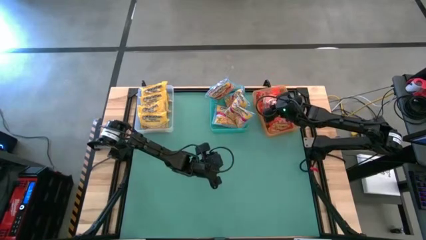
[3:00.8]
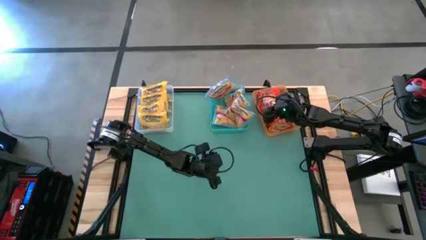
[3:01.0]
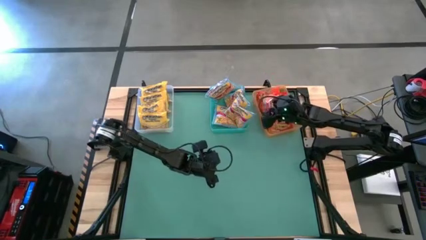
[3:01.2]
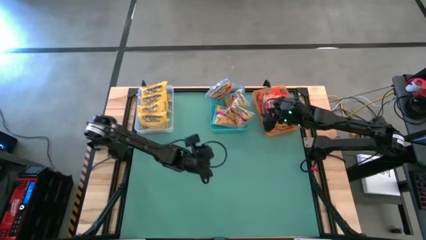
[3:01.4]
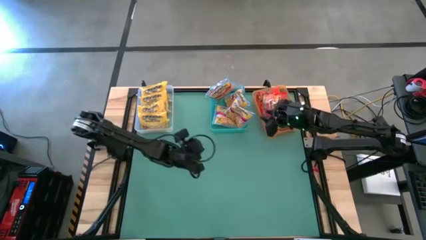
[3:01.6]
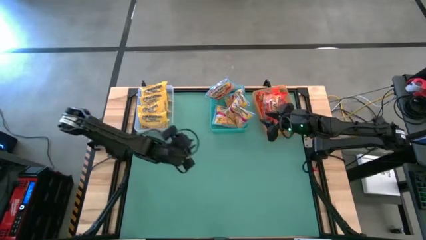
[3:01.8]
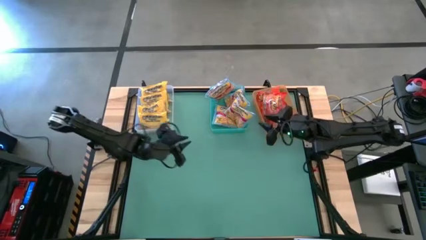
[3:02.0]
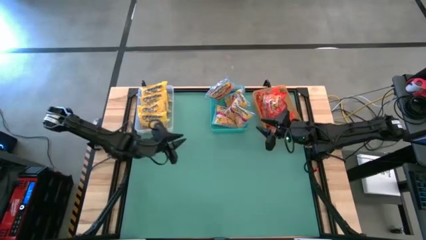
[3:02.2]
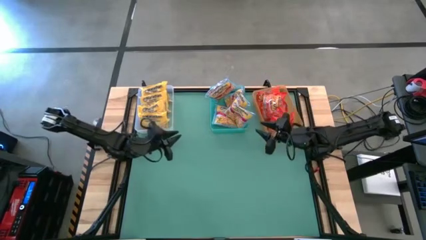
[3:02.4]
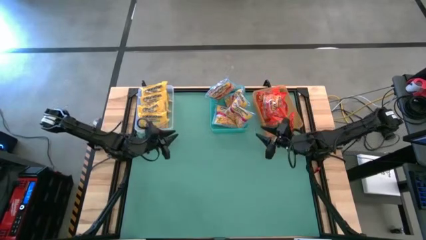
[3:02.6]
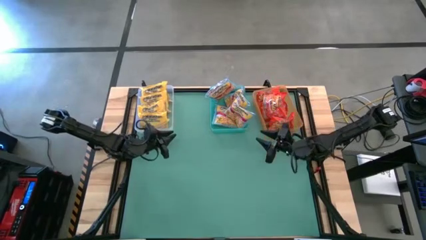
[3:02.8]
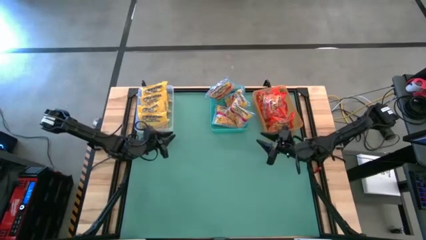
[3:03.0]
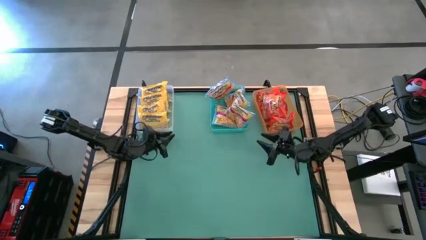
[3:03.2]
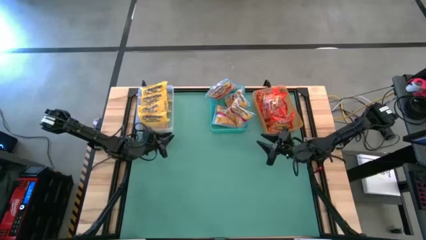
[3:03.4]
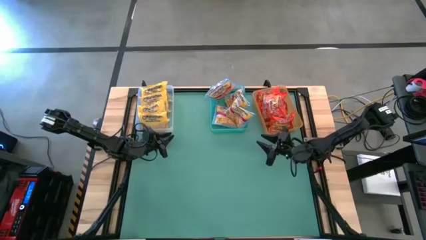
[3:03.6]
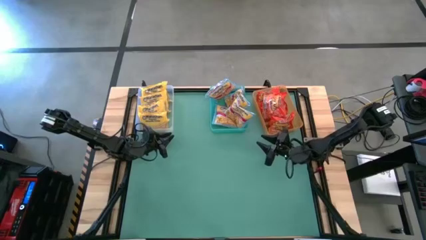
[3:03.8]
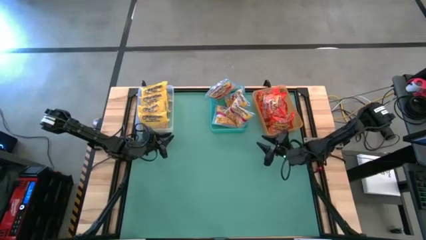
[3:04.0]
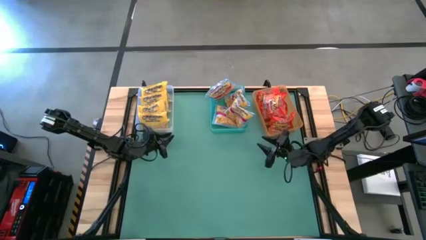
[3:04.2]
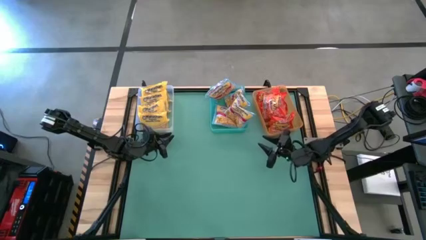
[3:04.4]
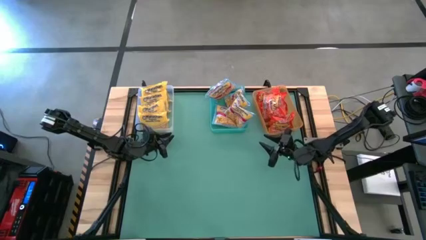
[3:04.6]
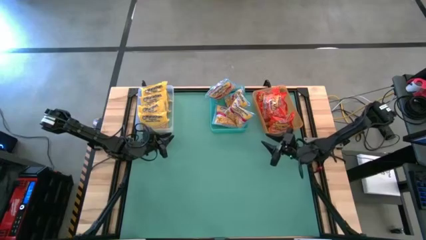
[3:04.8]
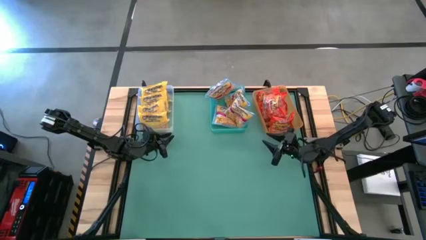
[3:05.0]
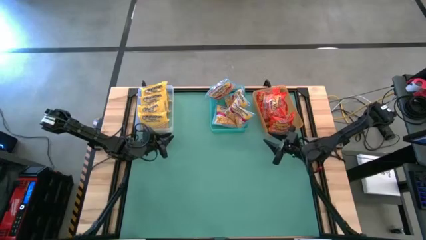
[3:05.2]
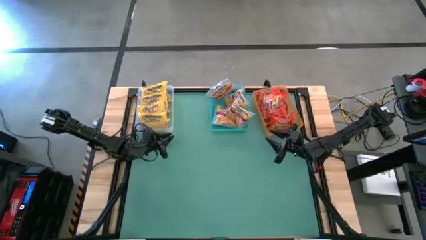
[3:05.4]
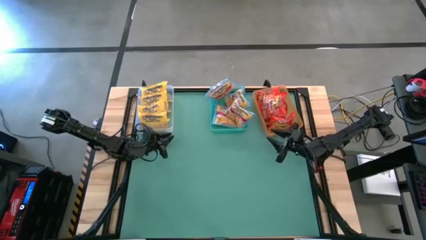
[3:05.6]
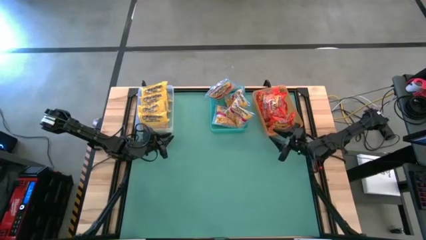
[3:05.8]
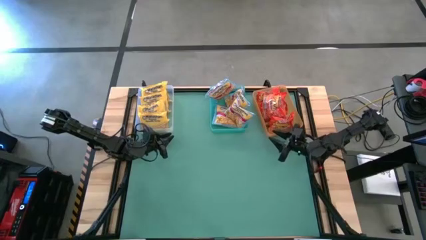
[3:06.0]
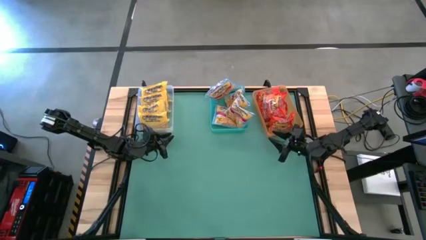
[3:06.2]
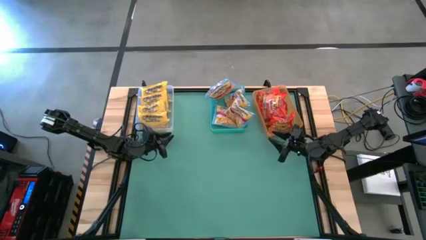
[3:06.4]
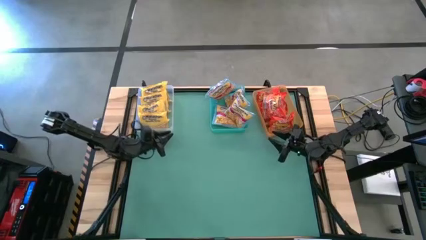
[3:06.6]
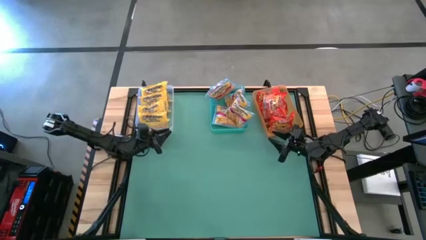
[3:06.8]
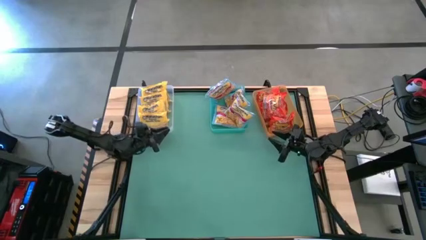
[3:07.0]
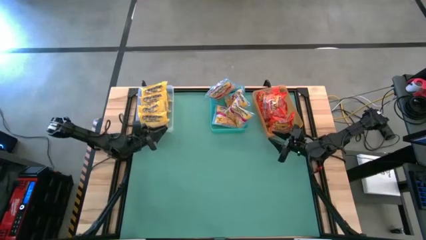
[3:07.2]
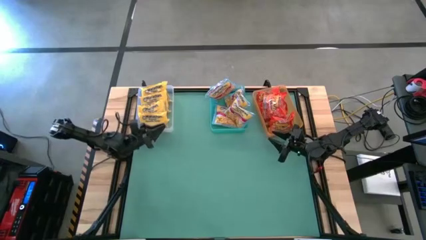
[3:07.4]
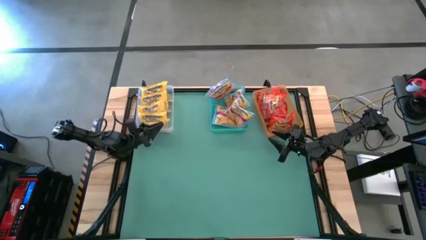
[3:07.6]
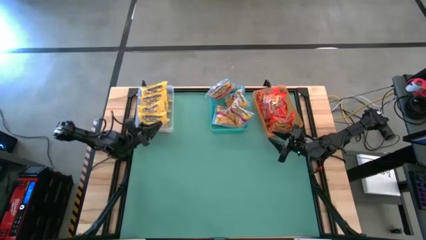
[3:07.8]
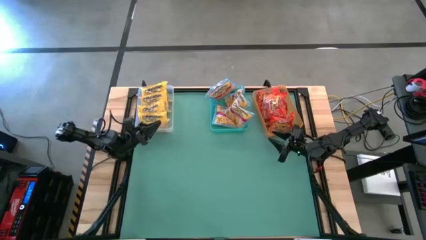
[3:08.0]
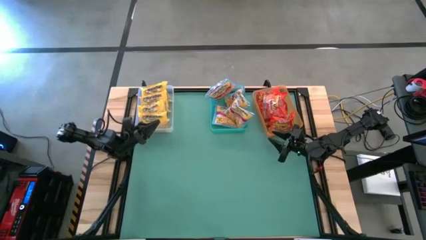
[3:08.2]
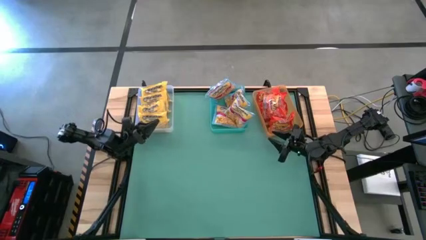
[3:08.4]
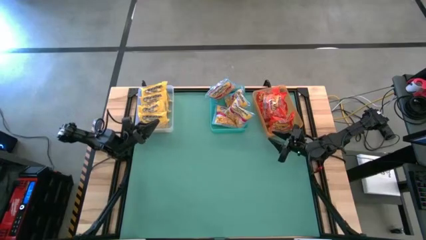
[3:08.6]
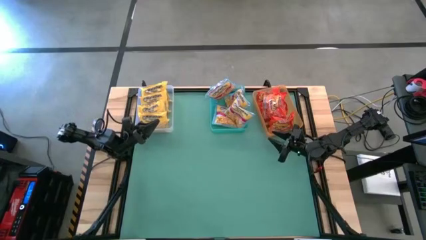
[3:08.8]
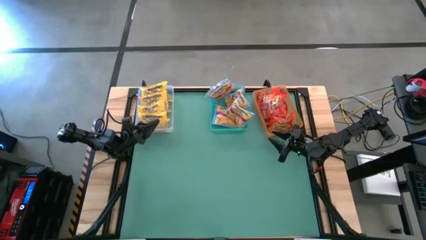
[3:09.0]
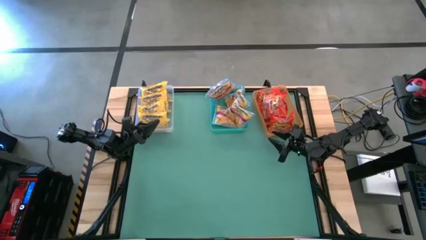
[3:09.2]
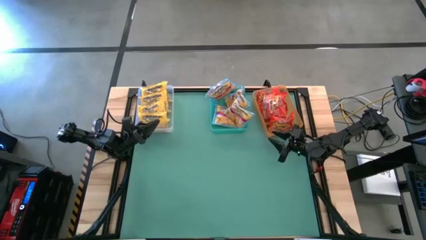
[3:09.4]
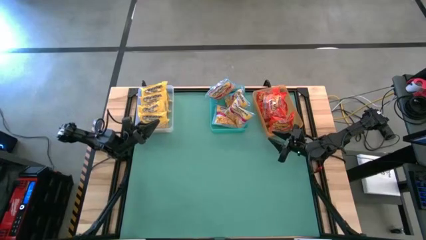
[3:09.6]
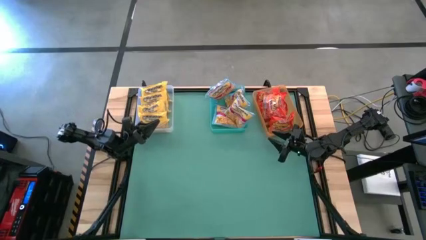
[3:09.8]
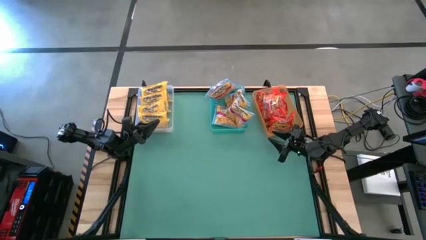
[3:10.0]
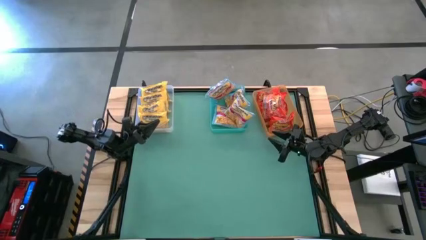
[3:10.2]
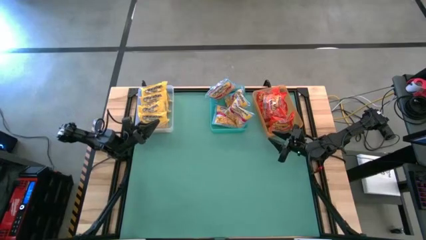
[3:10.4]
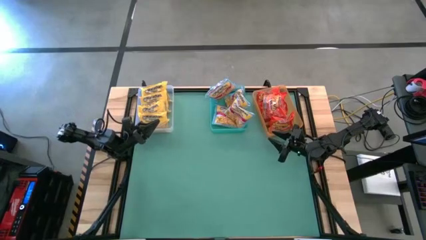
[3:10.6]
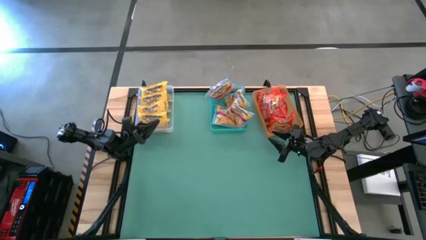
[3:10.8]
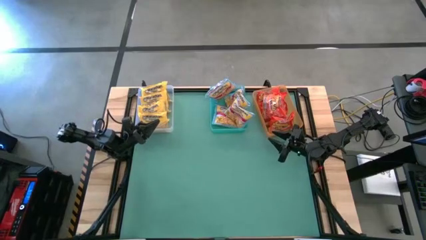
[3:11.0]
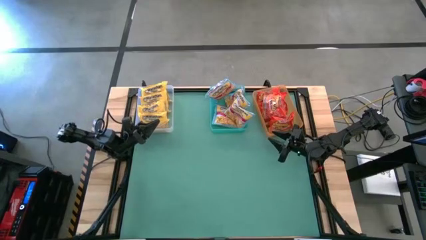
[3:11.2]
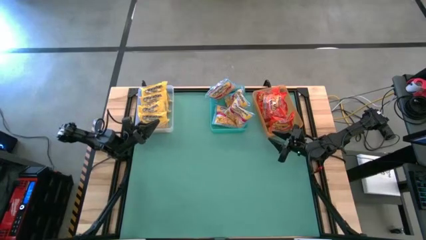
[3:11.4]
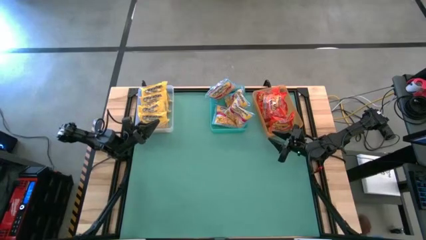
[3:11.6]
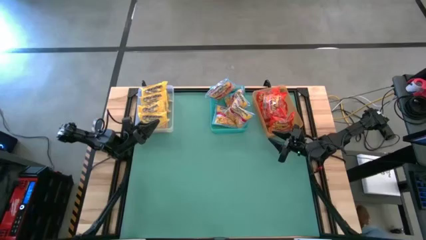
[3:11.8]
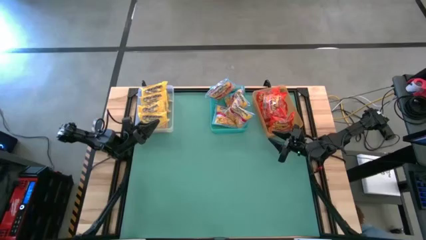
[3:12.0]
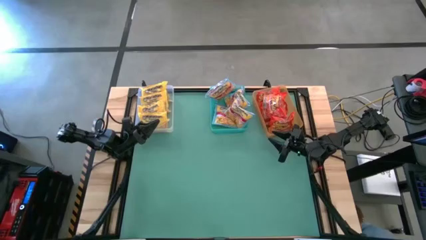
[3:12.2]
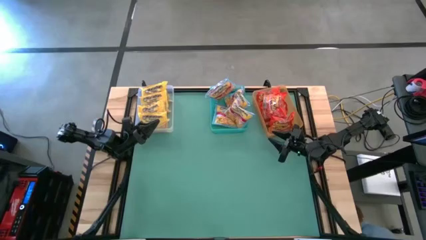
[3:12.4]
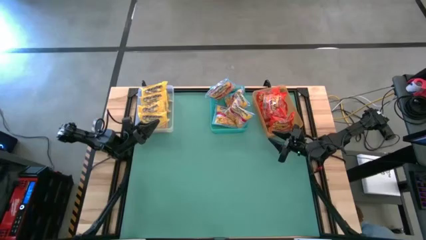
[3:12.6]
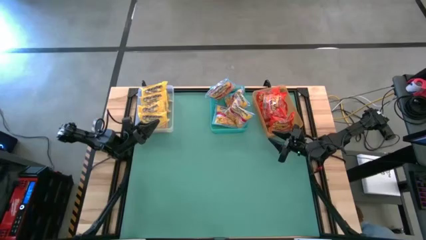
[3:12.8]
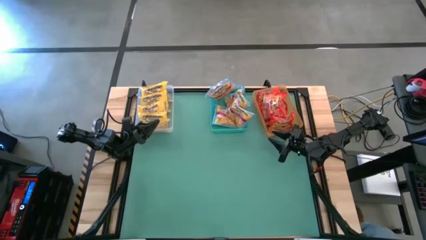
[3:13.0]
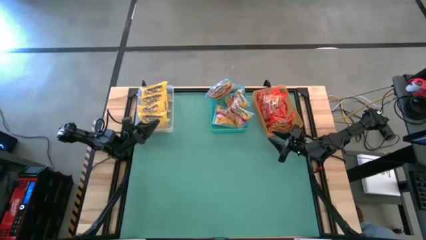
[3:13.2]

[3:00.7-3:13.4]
Task: Sort Maruchan noodles
Return to Home Position
